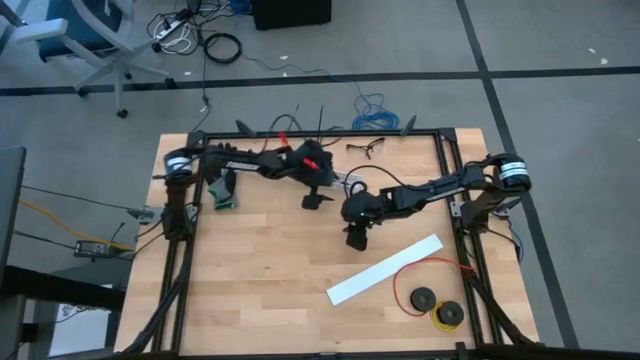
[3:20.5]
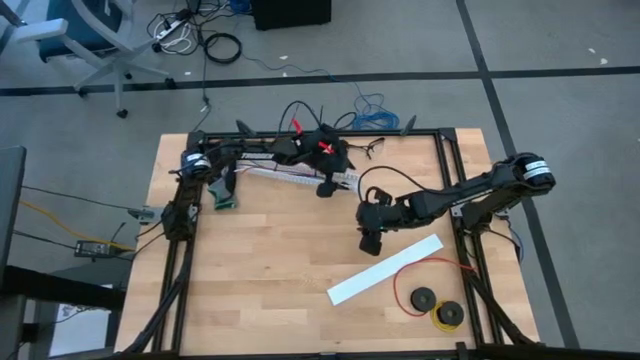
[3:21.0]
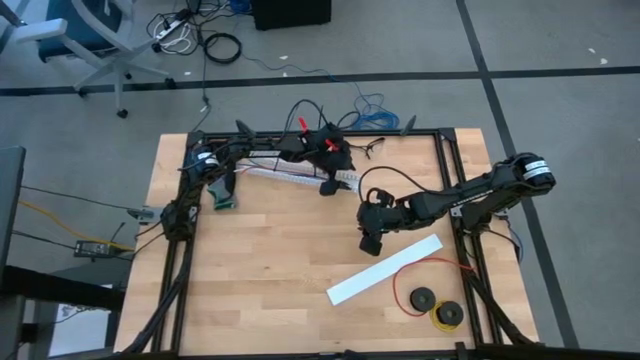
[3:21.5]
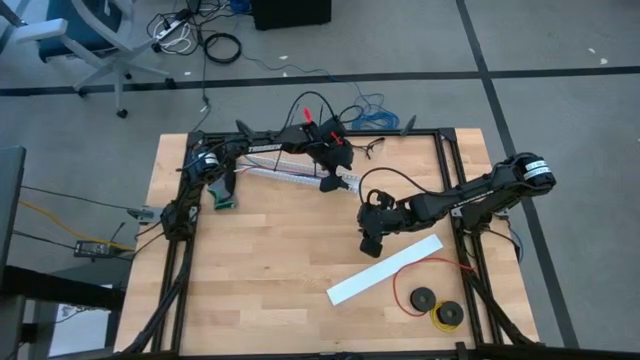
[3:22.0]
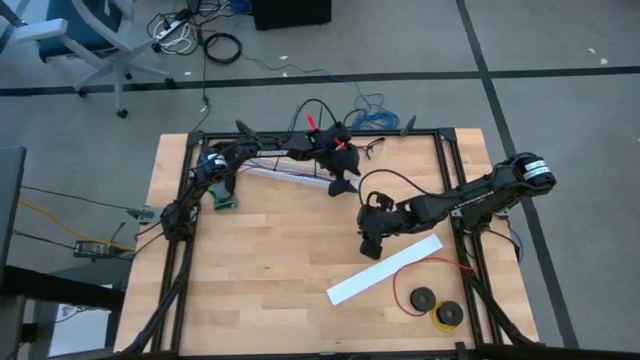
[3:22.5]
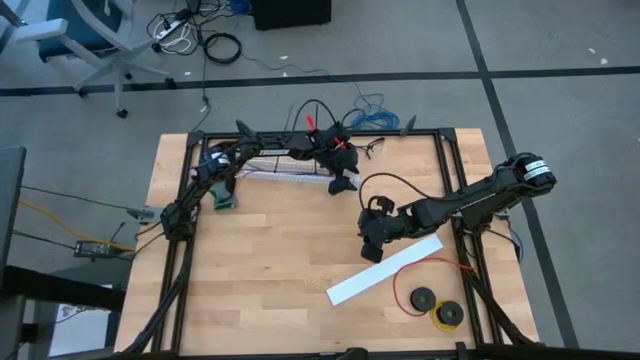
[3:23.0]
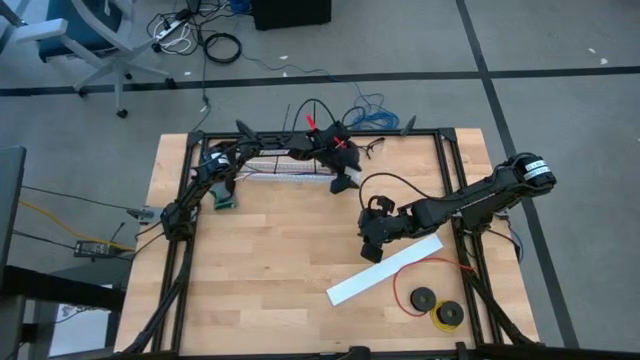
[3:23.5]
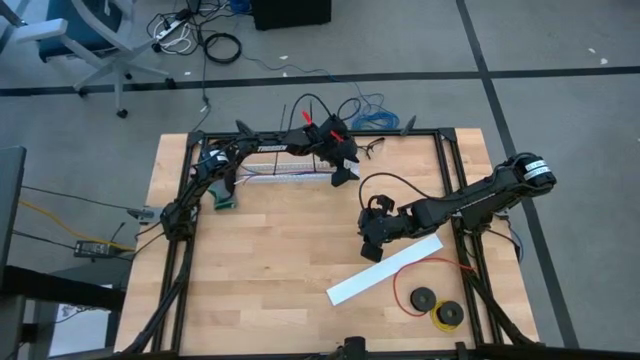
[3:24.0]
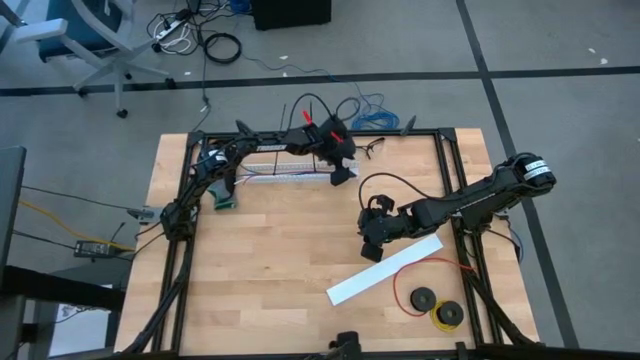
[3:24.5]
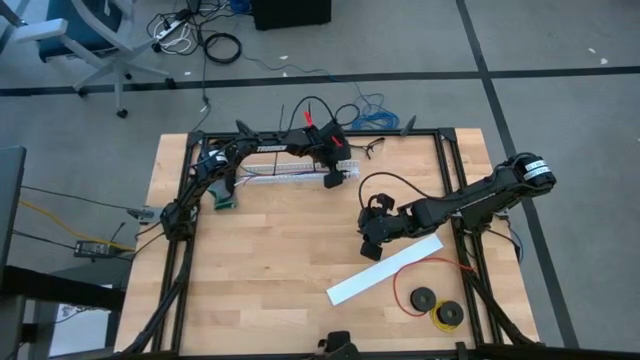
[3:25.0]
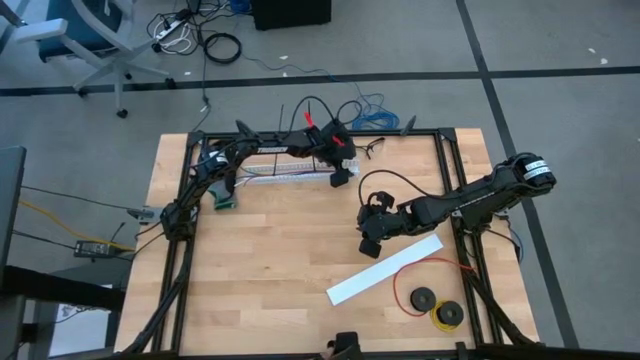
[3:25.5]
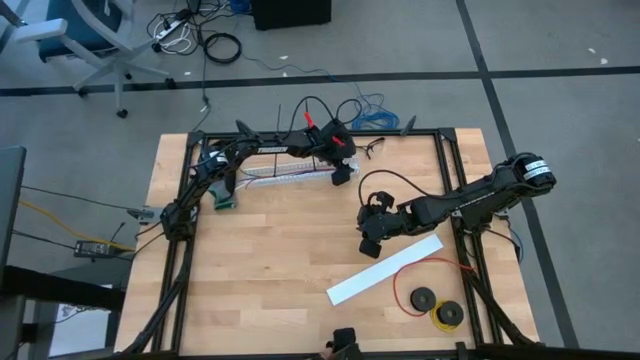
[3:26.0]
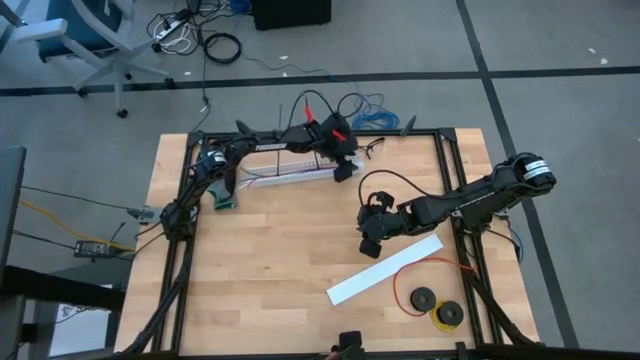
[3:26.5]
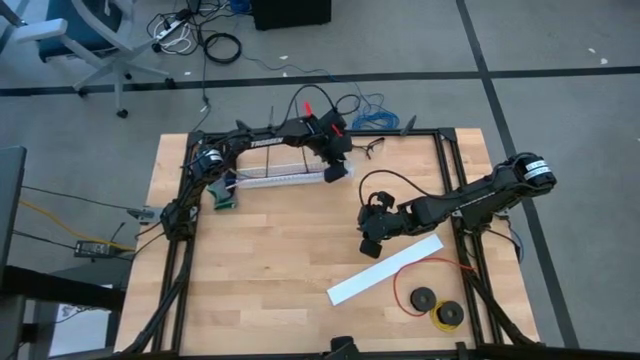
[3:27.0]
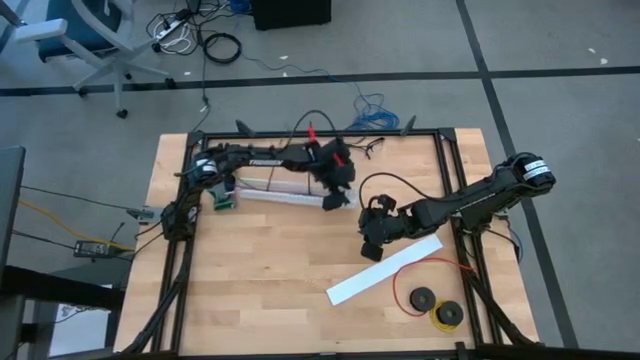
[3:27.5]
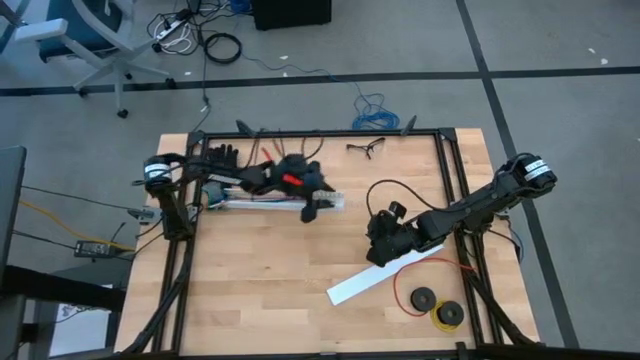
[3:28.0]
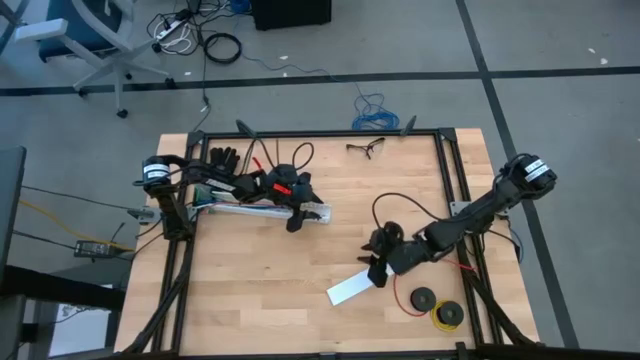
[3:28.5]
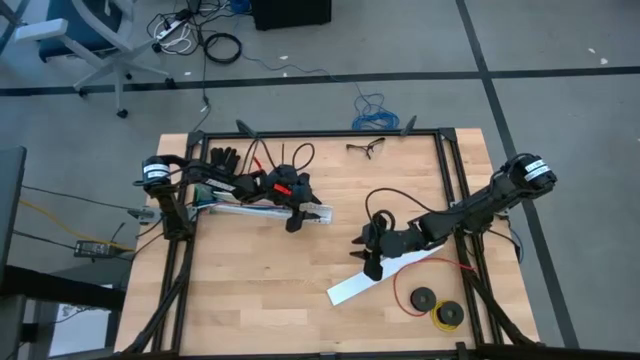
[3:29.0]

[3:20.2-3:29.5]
Task: Ziptie cables
Move the white cable duct to the middle left of the table

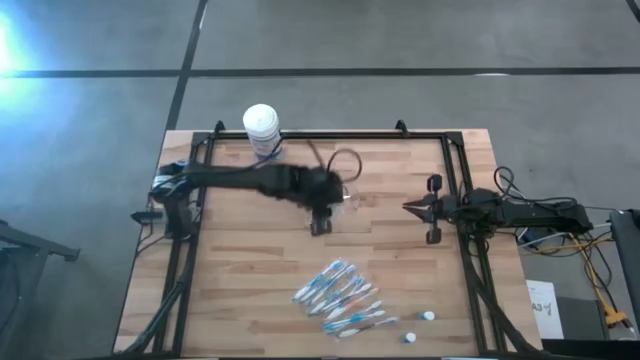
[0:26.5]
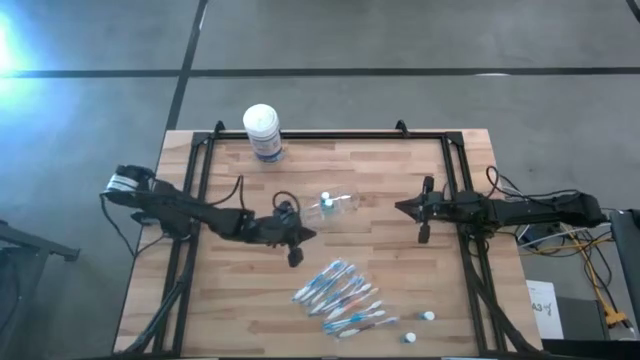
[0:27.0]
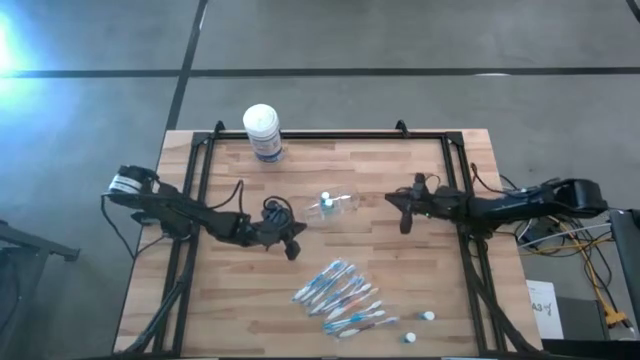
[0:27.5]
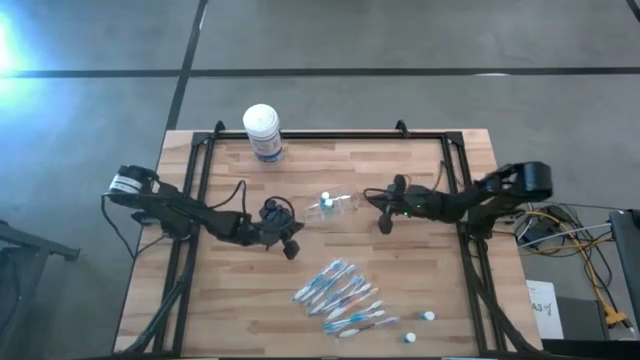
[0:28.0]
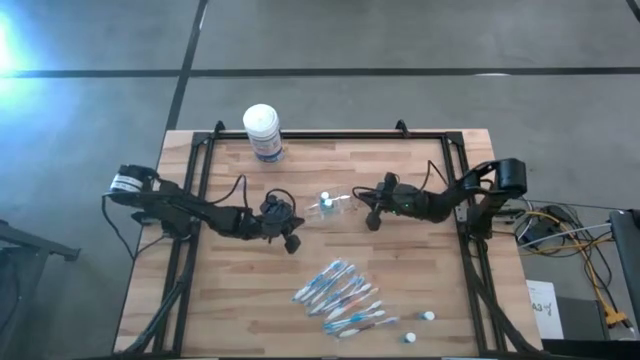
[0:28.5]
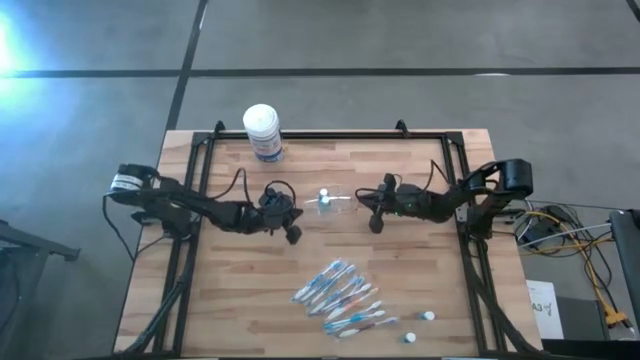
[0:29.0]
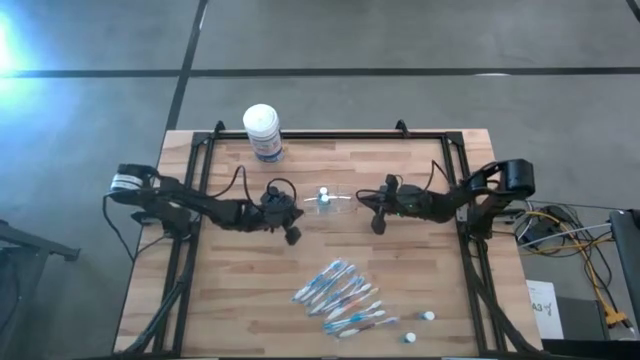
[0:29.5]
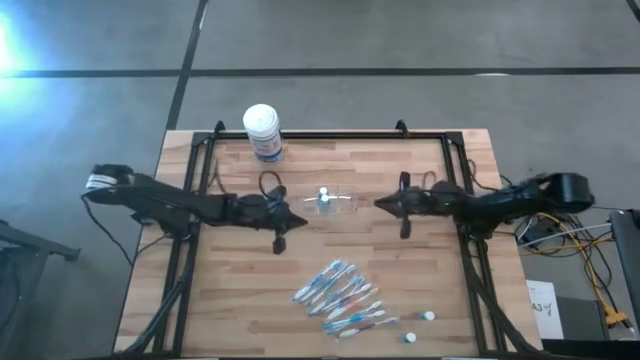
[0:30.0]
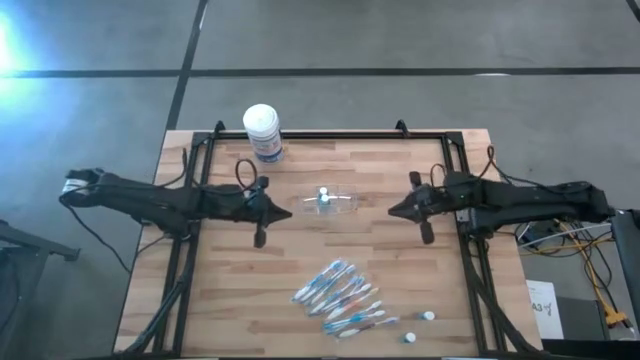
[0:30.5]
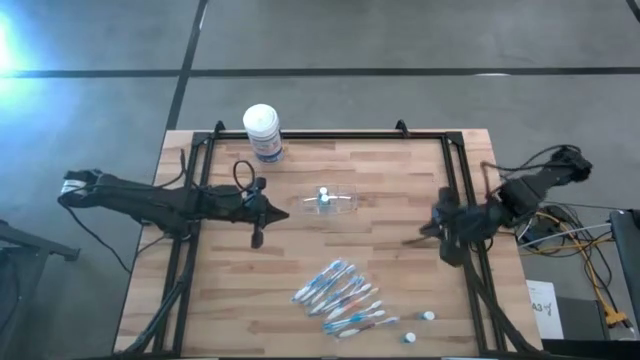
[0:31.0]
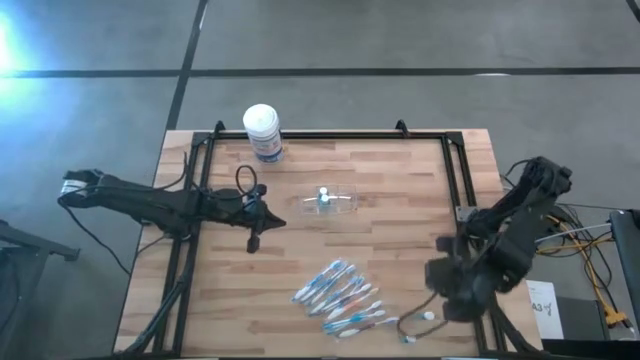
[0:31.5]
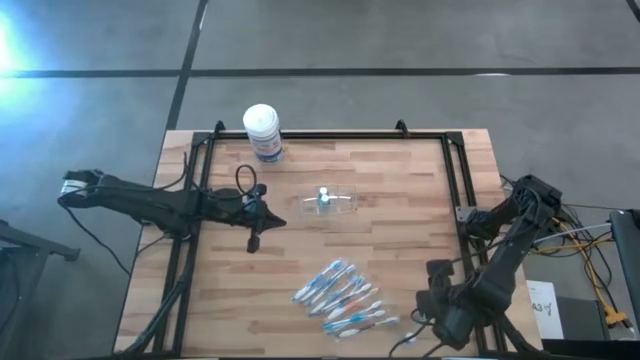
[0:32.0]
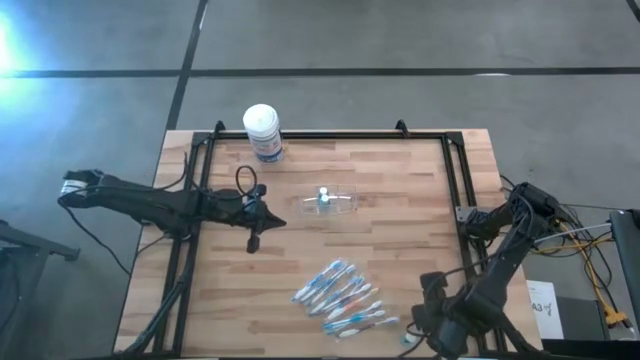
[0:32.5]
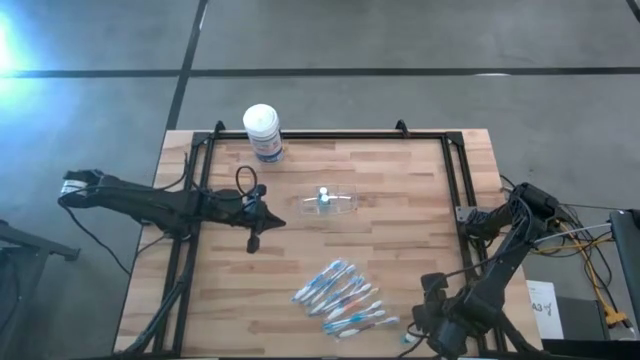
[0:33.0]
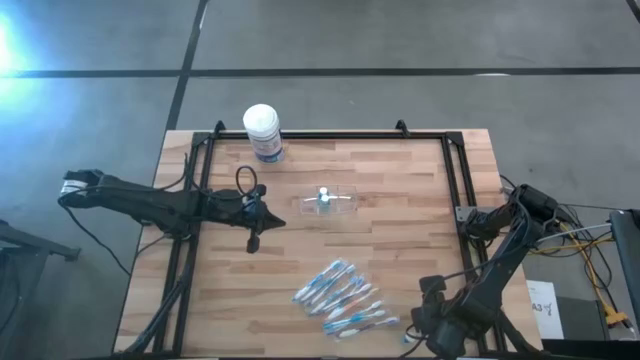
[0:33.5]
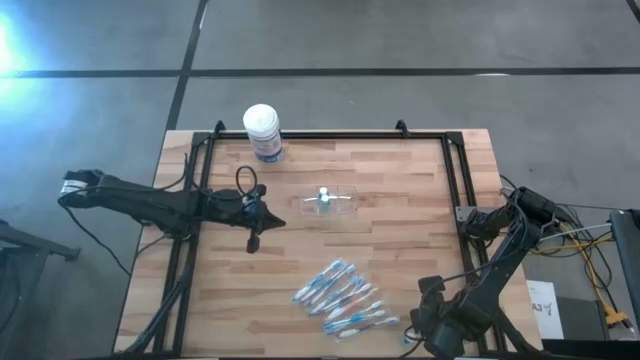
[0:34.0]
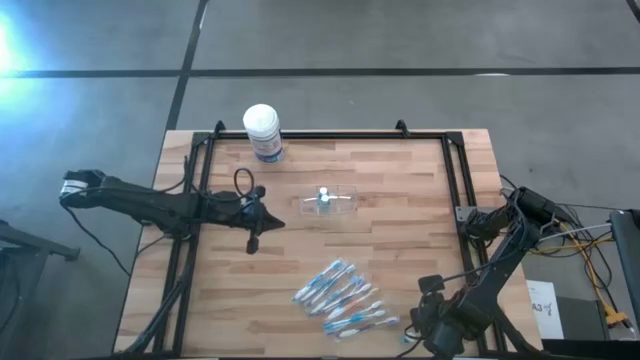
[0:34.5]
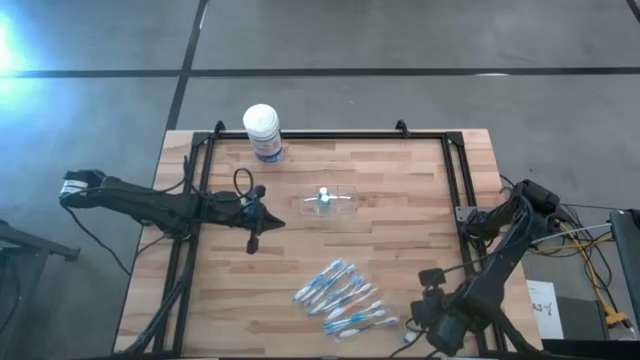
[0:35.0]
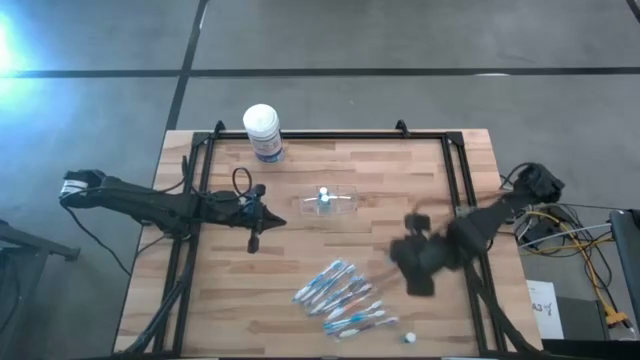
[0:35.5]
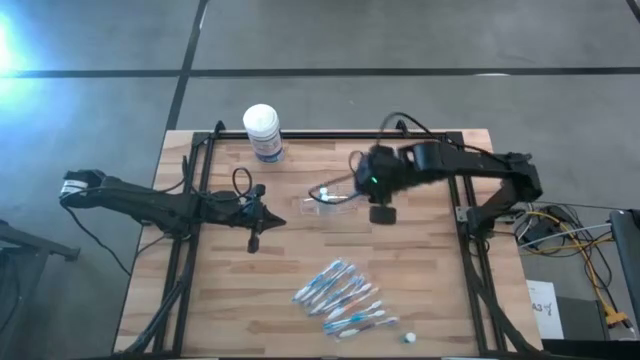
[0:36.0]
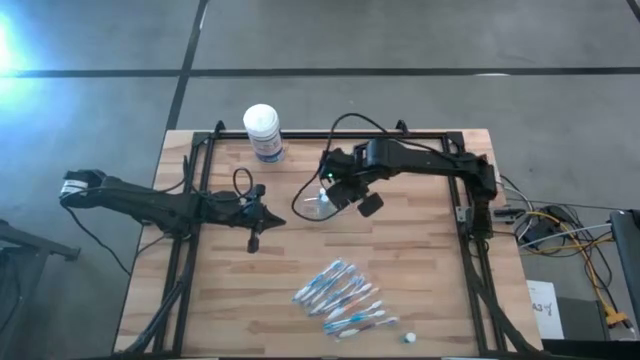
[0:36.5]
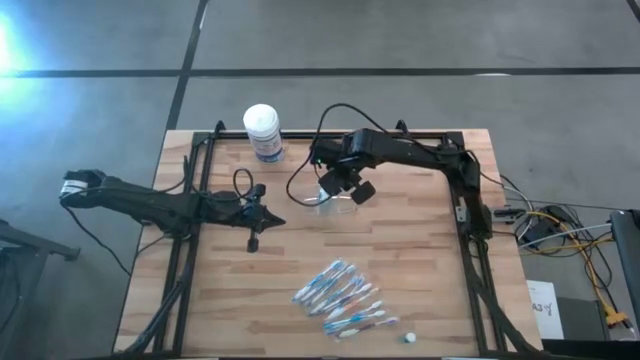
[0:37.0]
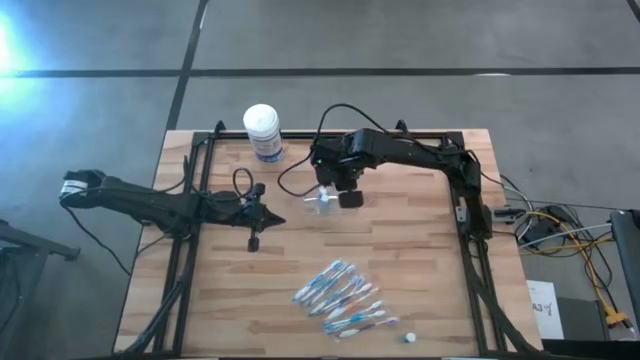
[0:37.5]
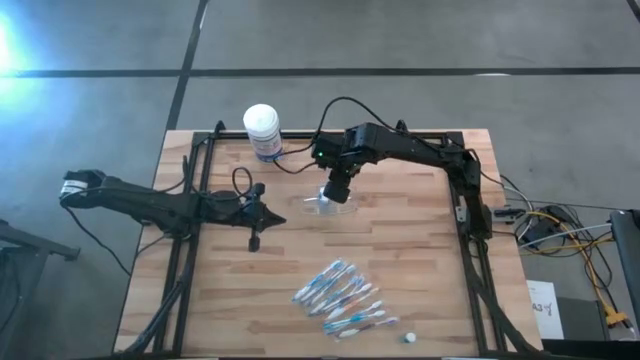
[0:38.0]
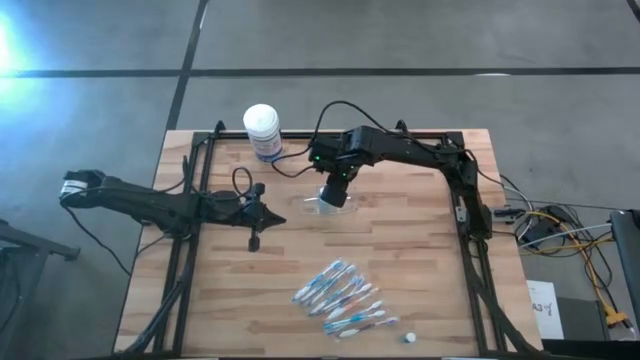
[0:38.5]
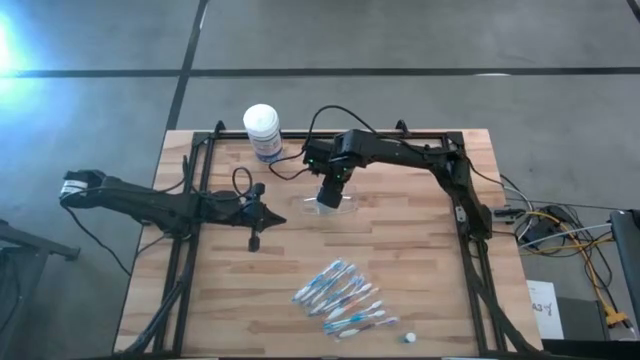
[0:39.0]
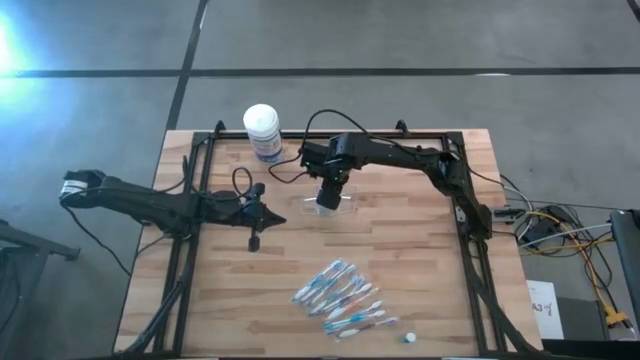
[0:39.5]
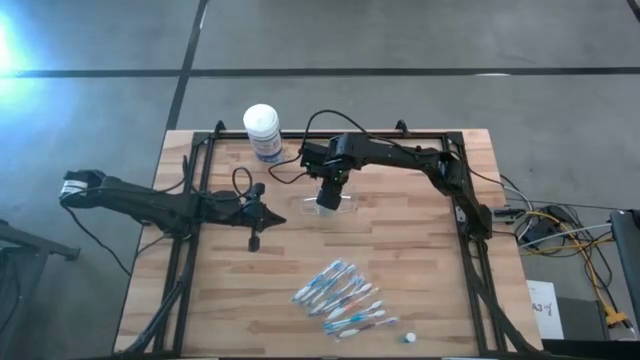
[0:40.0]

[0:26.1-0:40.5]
Task: Pick & Place toothbrushing station
Put the mouthwash into the transparent organizer
